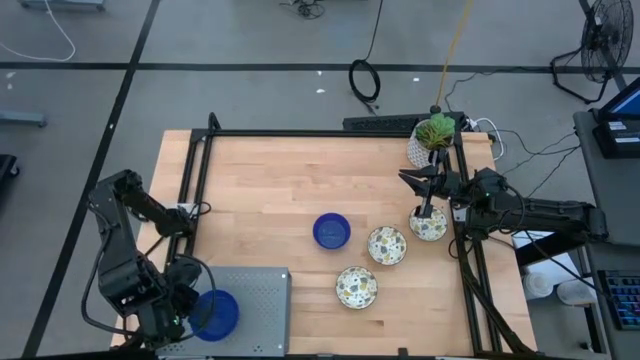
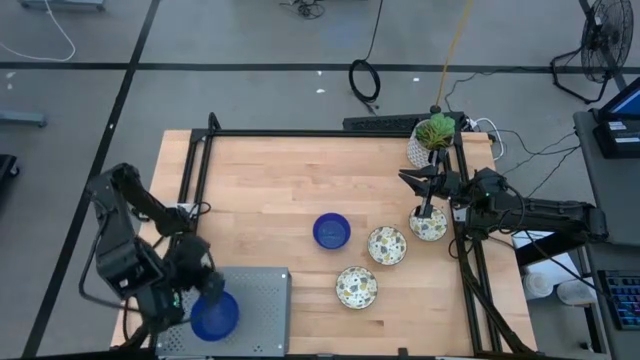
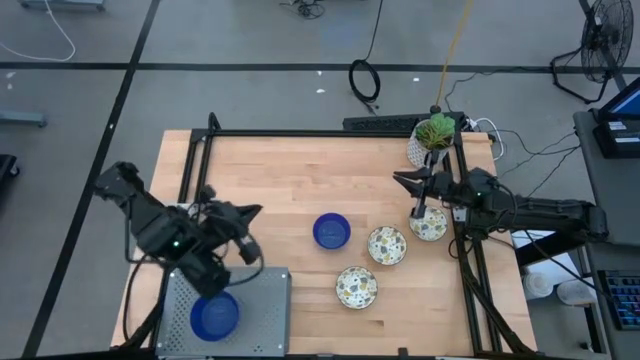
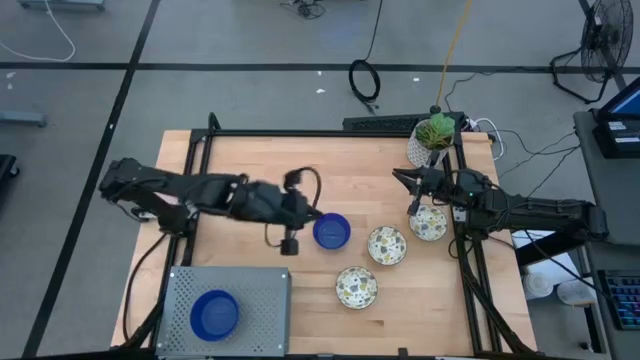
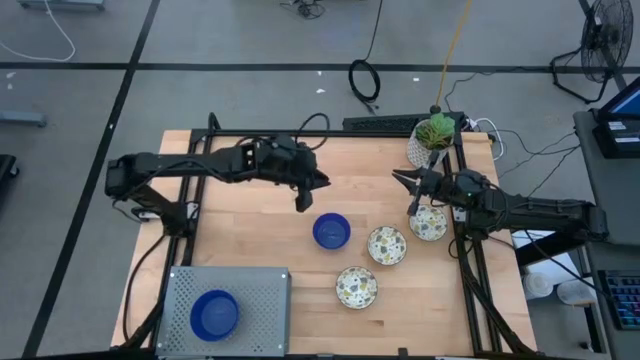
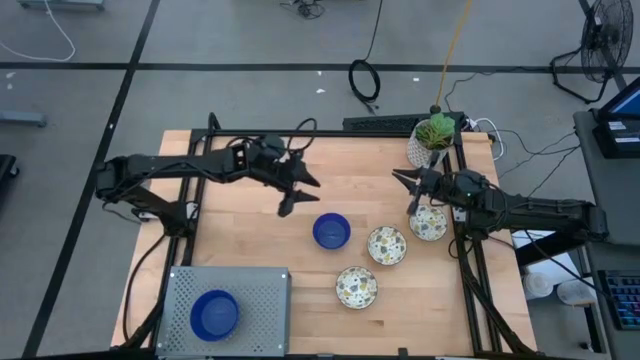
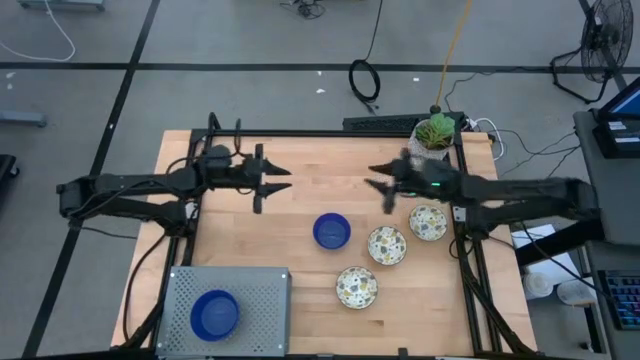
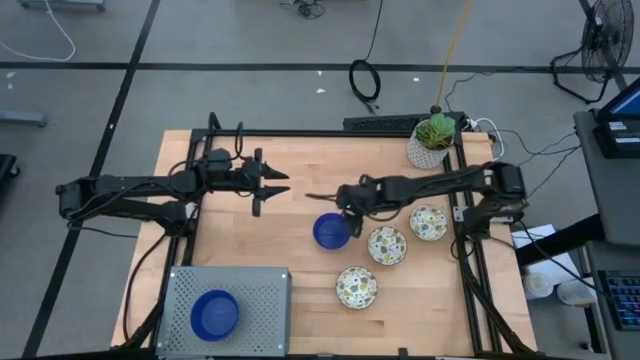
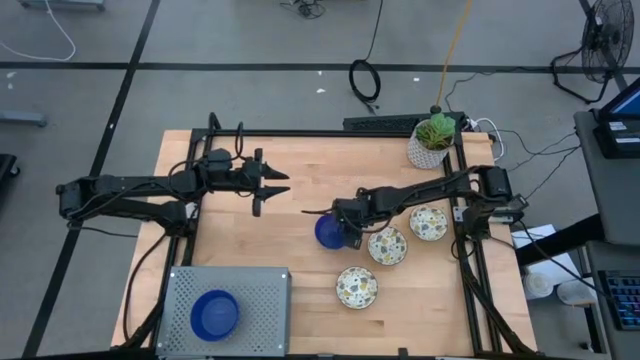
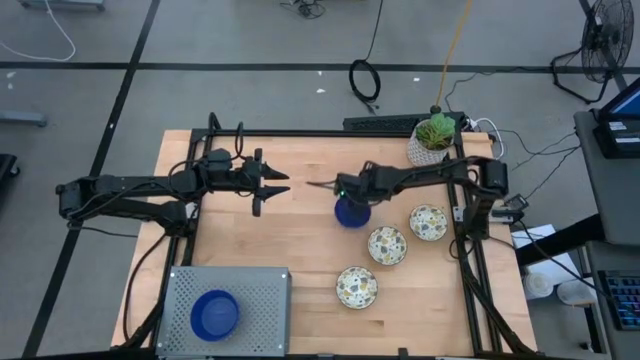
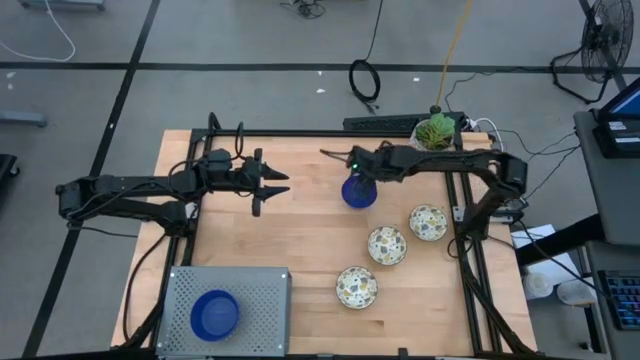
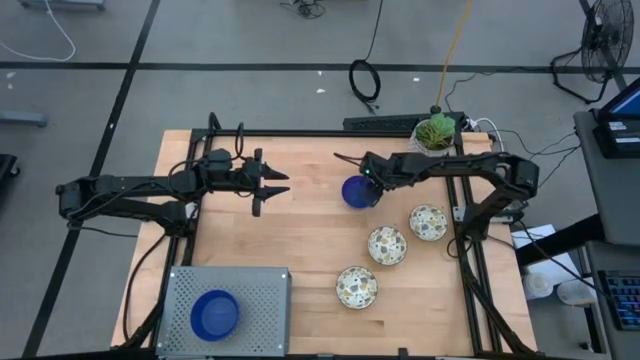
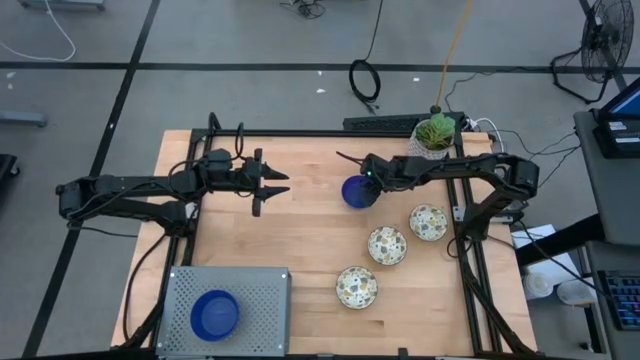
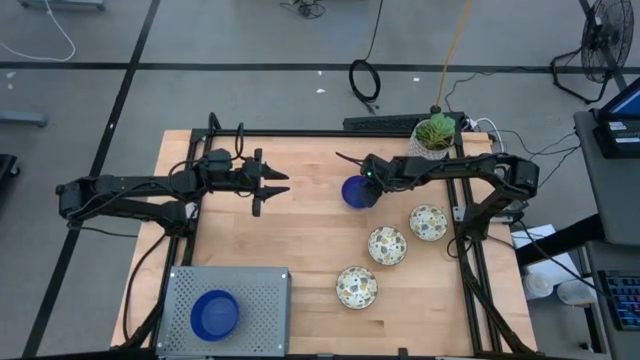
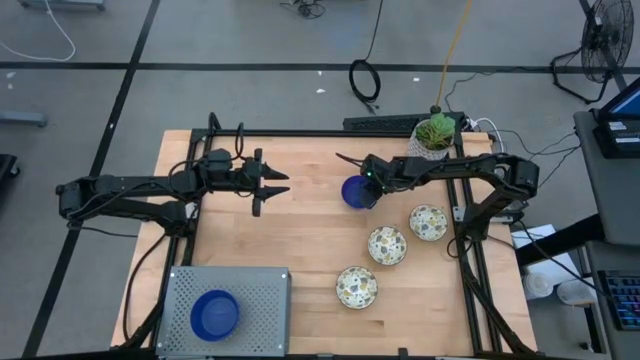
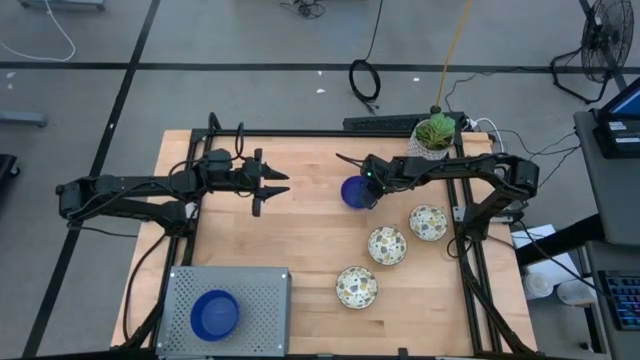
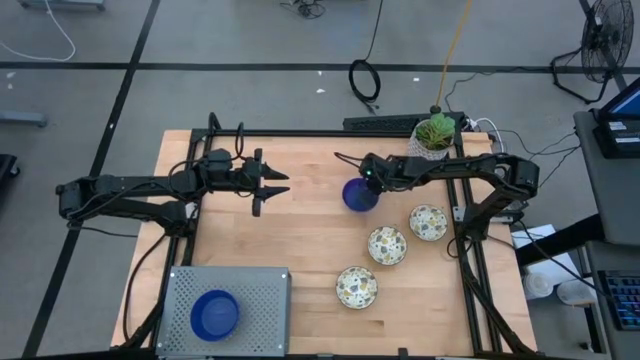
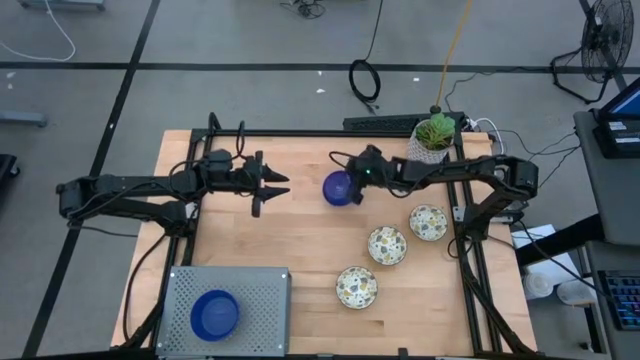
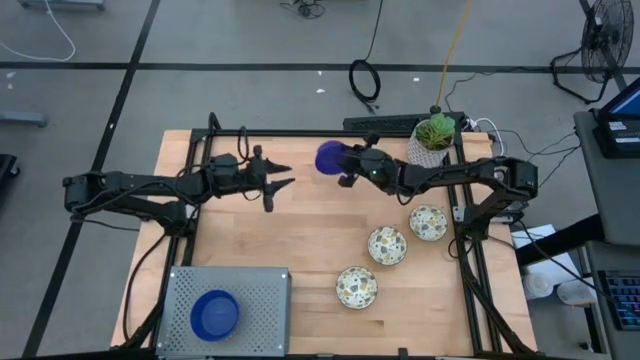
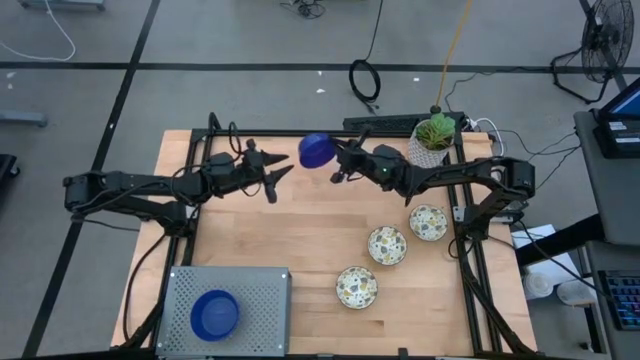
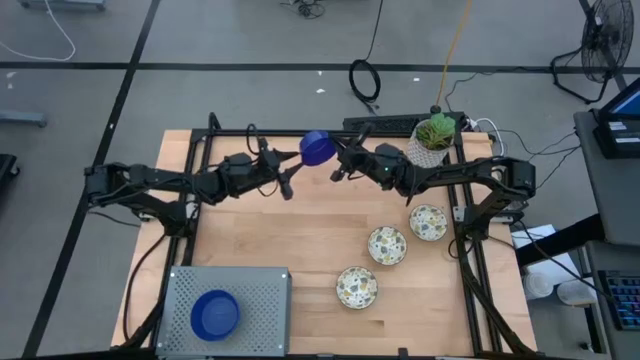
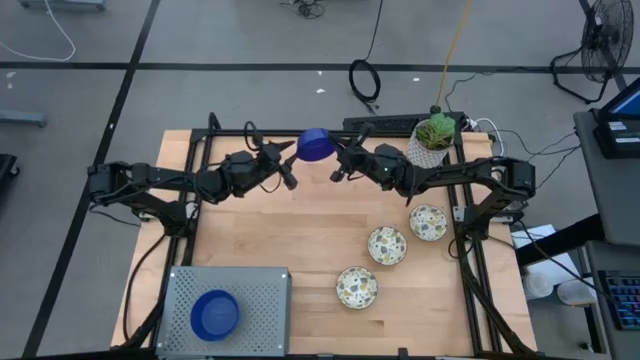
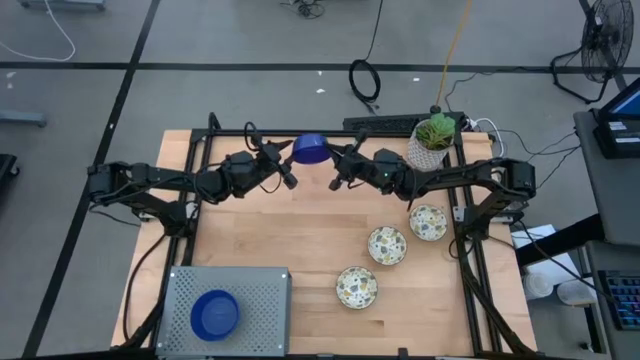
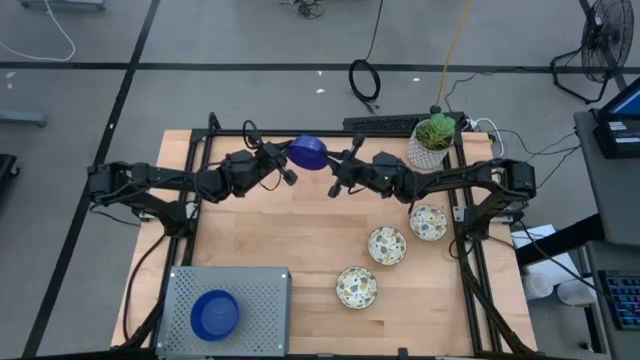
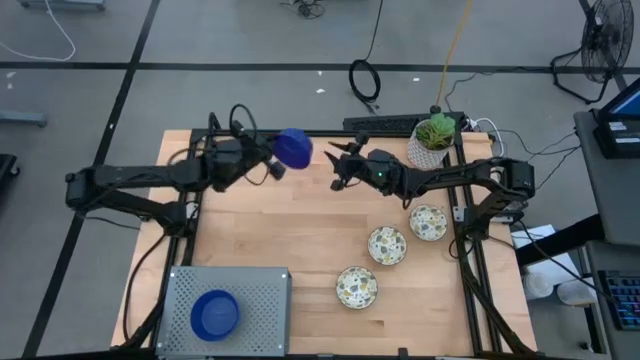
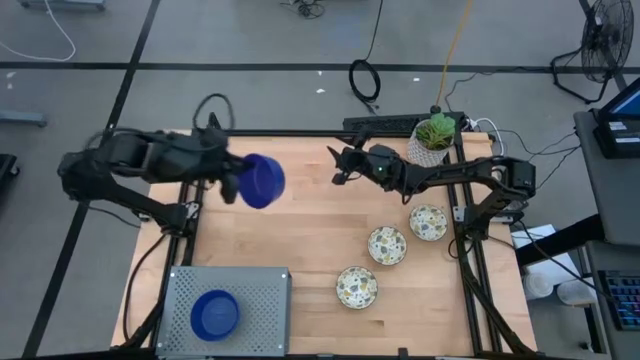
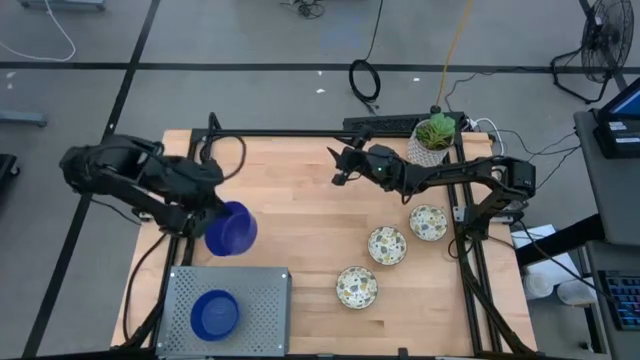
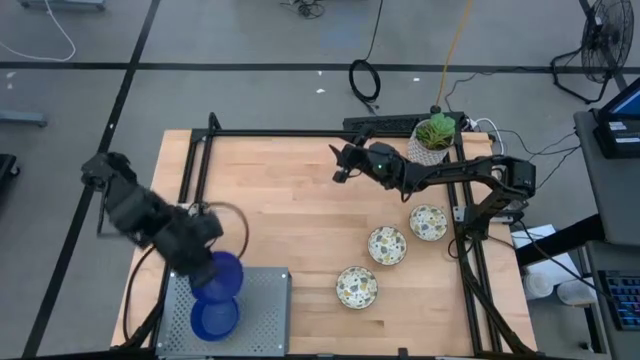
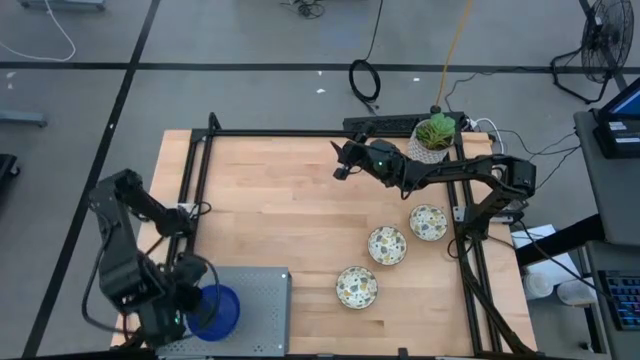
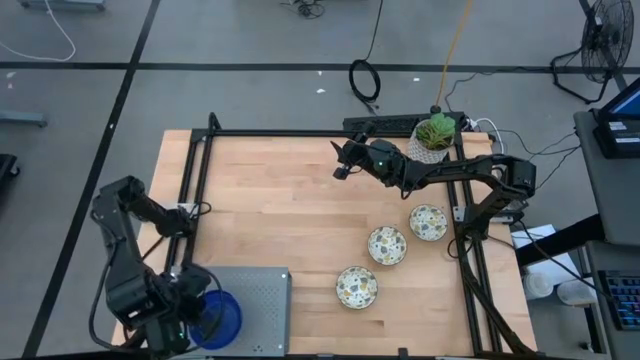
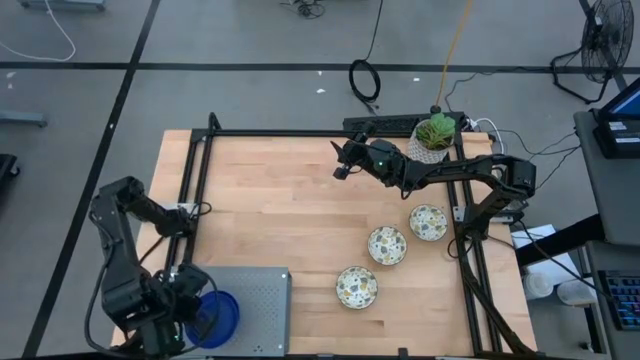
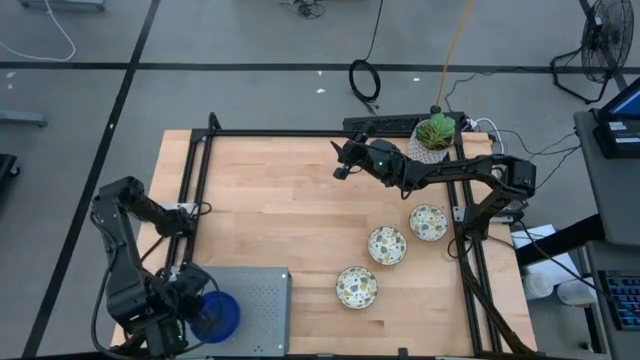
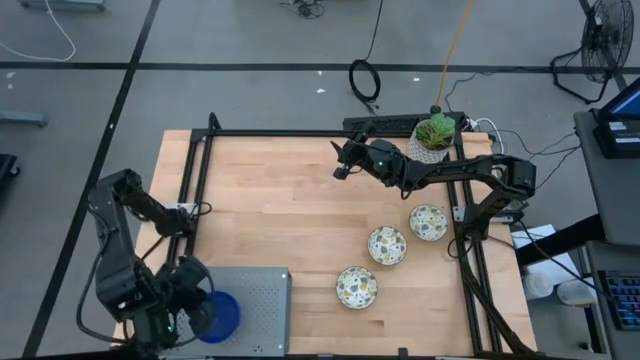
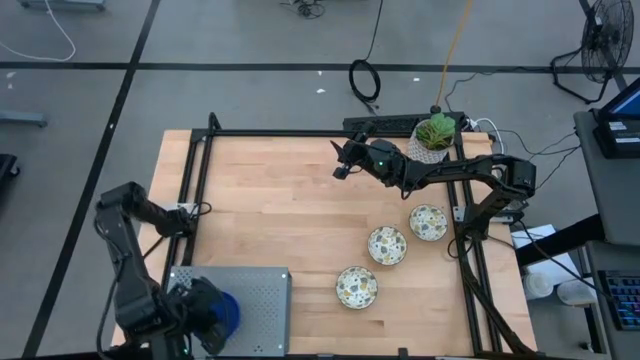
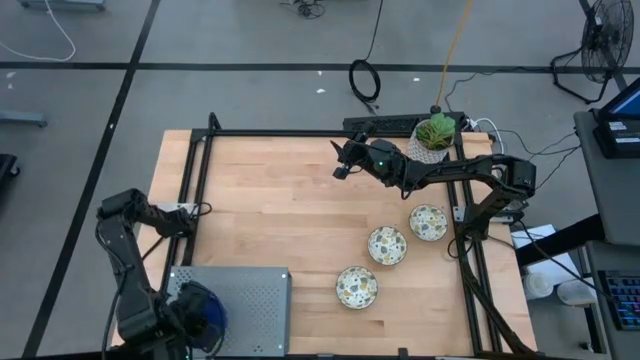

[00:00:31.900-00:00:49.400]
Task: Pick & Place Mini bowls
Stack the blue bowl on top of the other blue bowls on the shelf

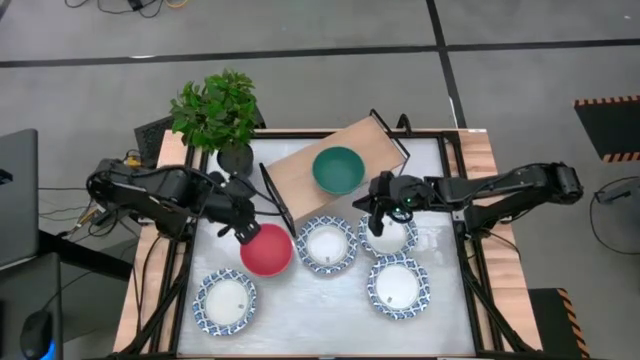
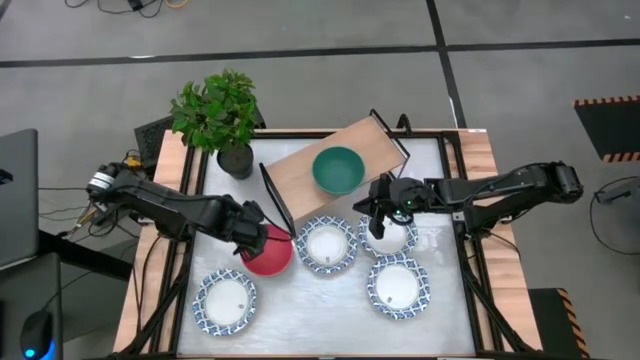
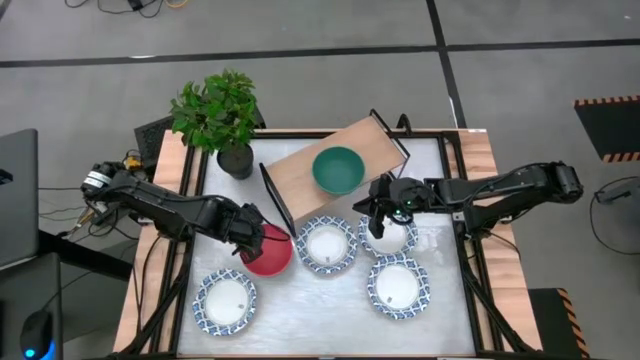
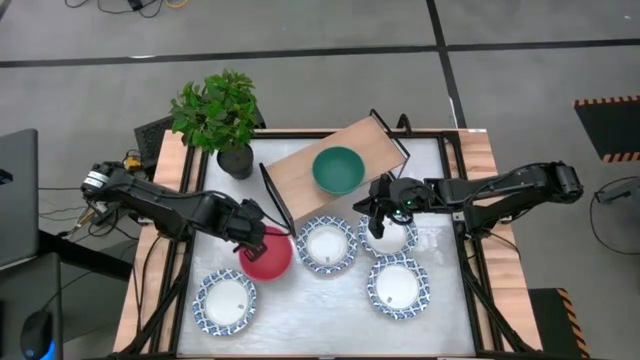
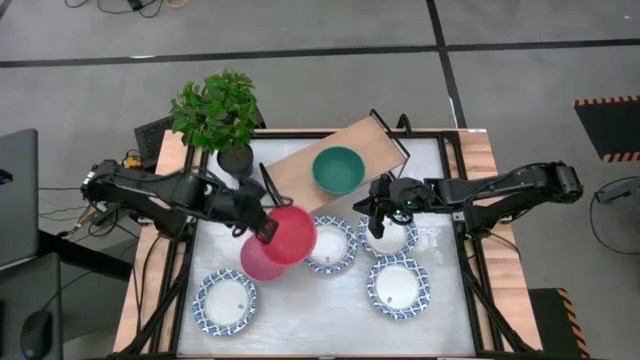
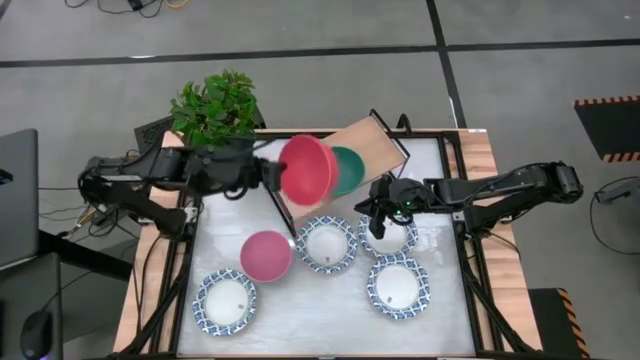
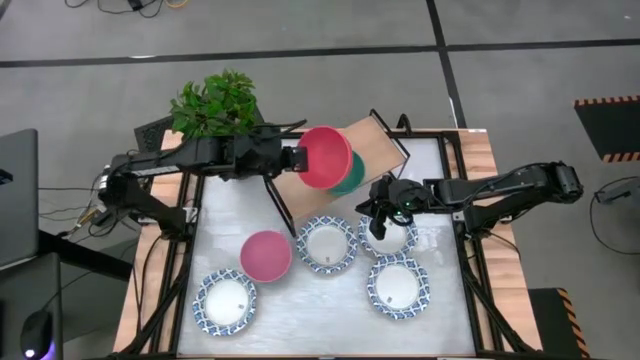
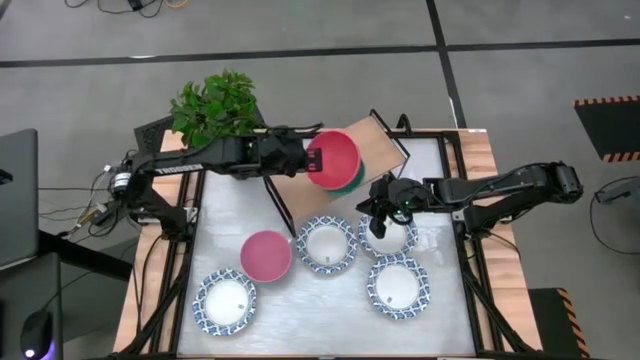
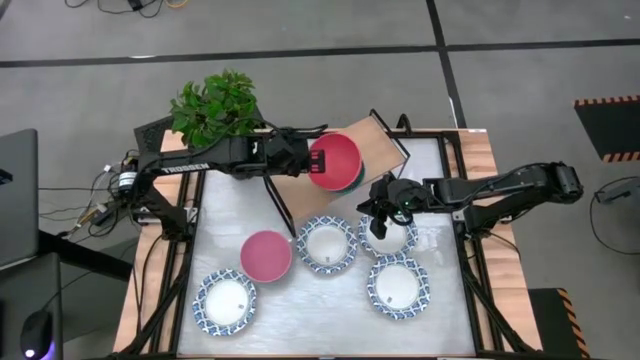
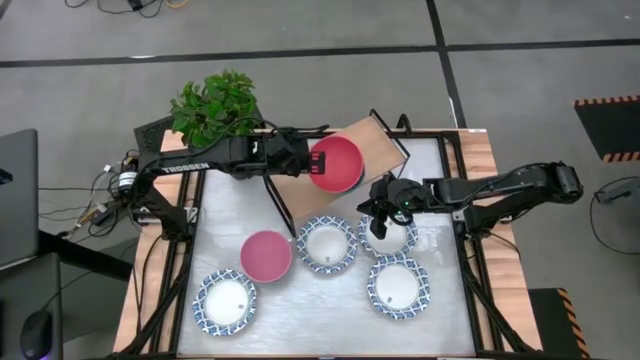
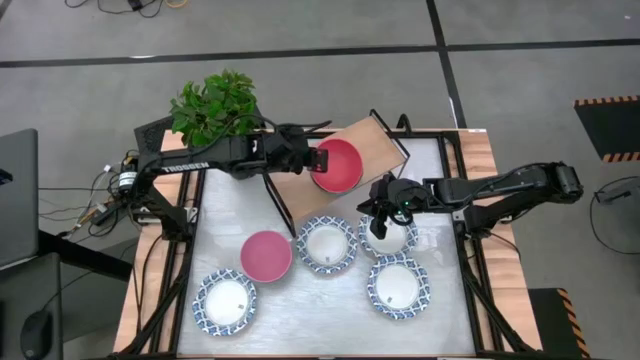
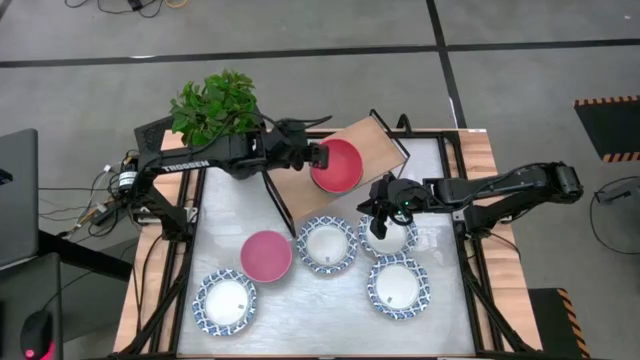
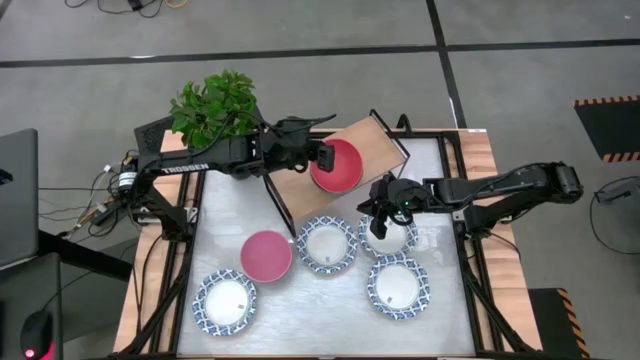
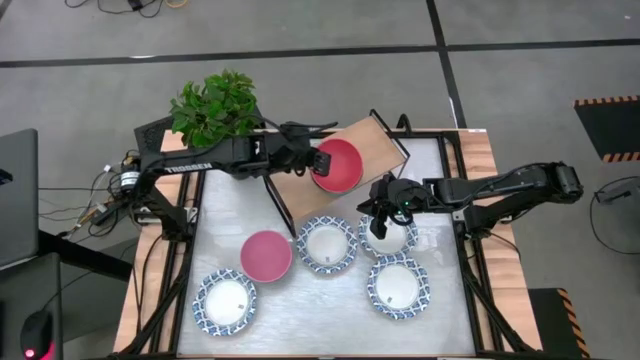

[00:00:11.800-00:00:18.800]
Task: Place and stack bowls onto a shelf
Stack the orange bowl on the green bowl on the shelf
